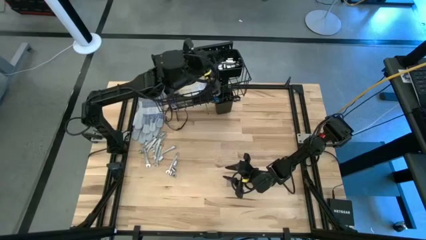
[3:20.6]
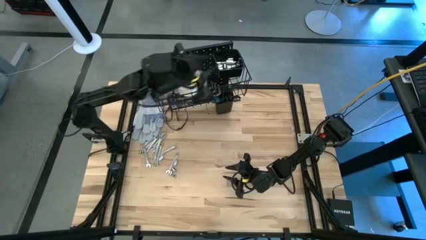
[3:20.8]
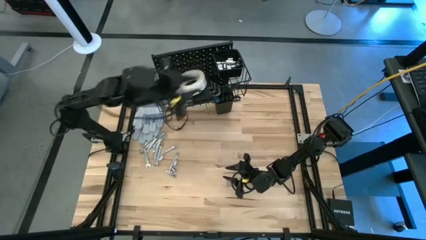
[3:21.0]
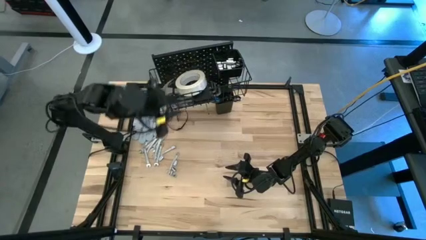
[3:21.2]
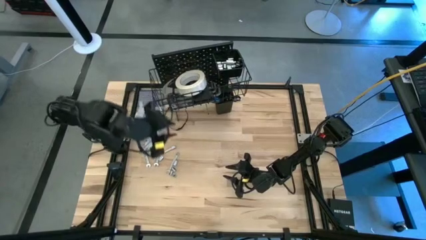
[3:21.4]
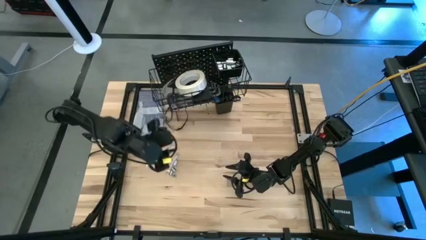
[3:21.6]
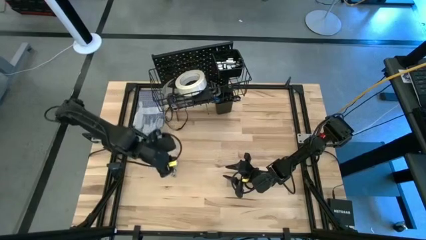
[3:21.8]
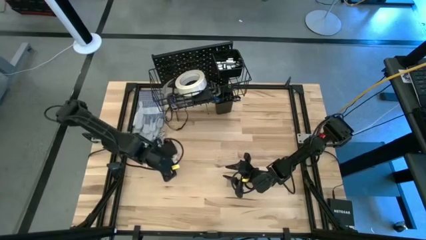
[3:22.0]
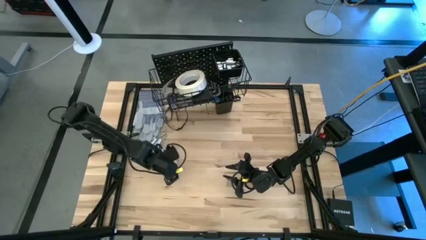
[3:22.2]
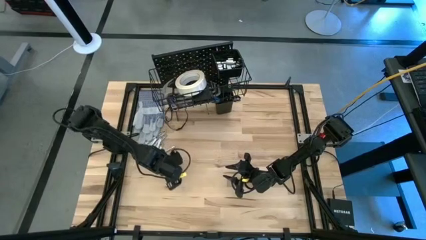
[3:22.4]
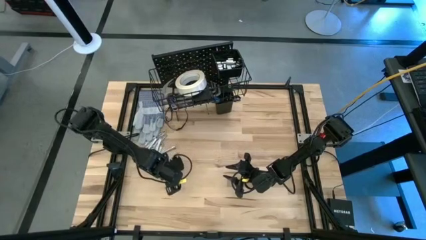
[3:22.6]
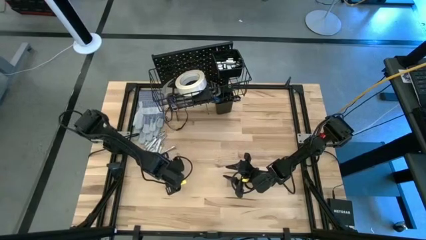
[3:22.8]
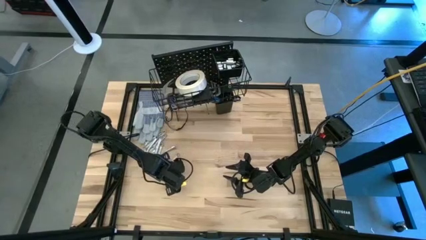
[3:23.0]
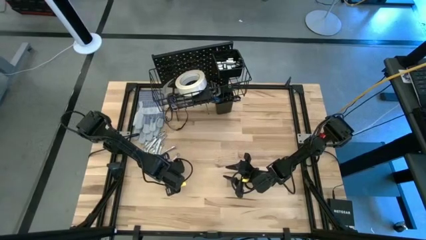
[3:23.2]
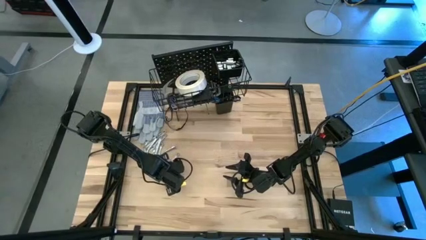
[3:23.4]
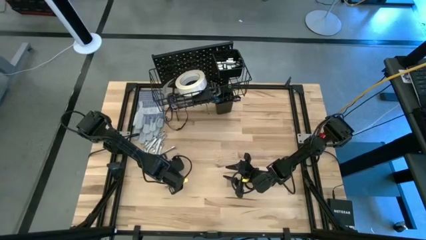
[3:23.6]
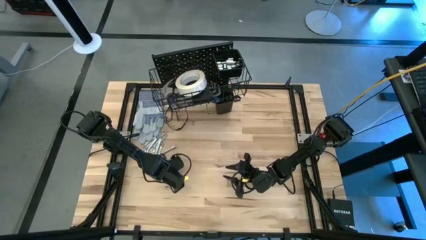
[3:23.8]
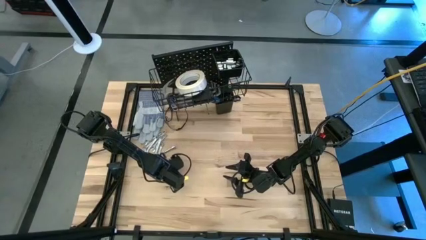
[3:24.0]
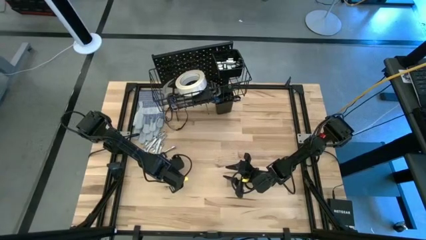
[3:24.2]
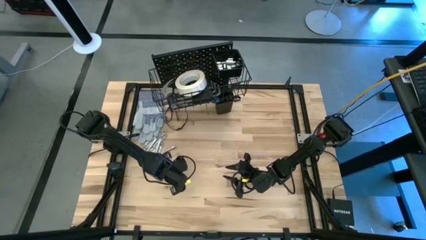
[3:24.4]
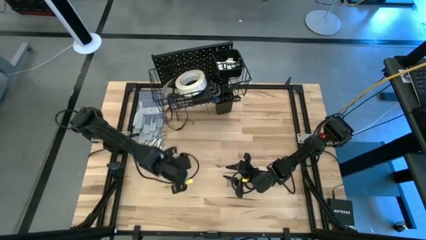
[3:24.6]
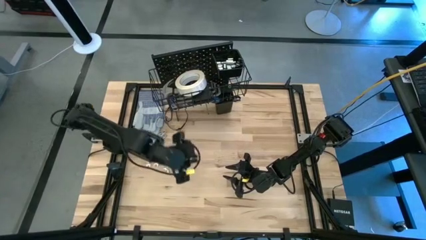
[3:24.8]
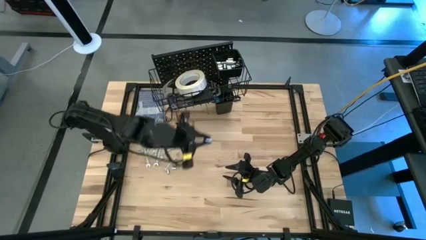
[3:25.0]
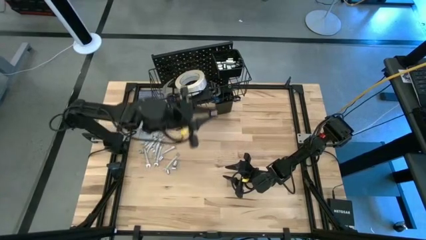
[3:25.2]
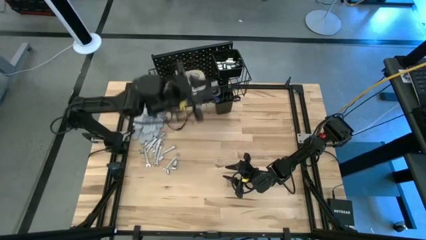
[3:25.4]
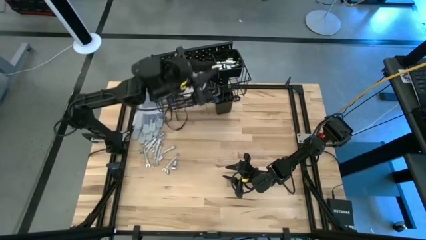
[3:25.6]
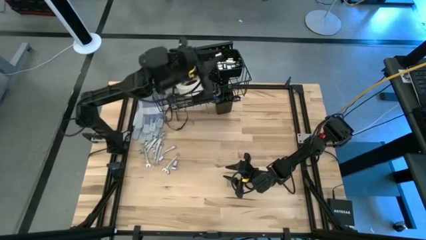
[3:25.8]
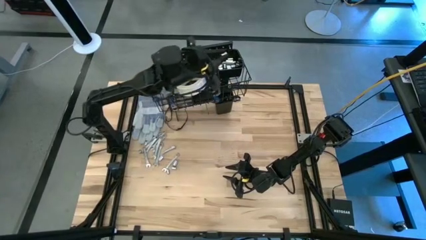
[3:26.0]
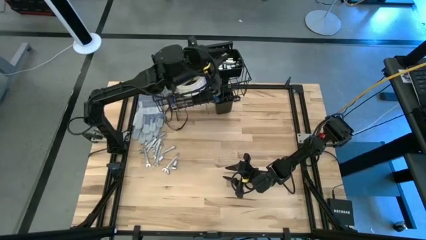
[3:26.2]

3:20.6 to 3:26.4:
Task: Hang tools onto peg board
Put the socket into the top black bin on the pegboard

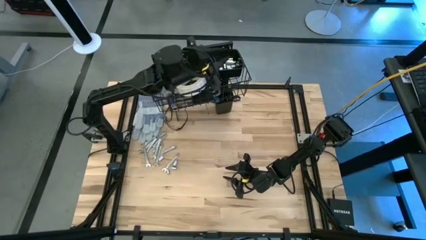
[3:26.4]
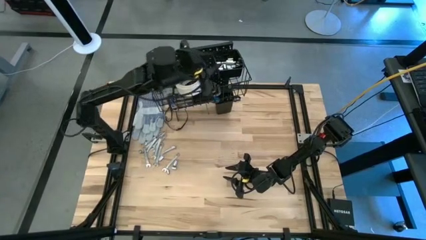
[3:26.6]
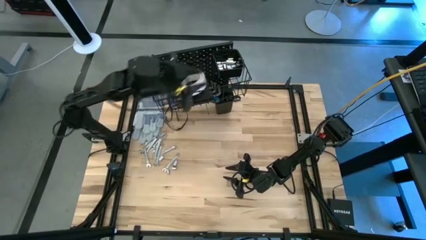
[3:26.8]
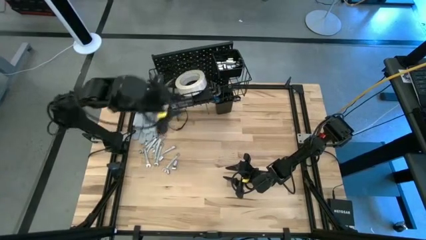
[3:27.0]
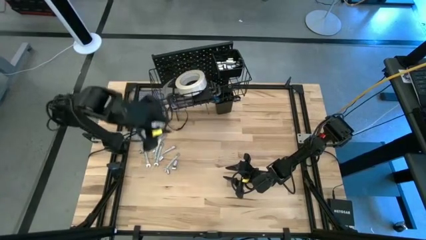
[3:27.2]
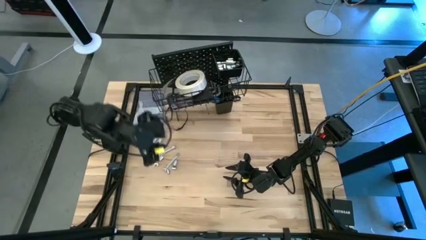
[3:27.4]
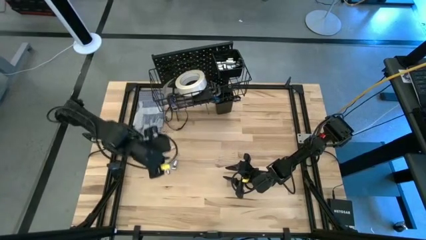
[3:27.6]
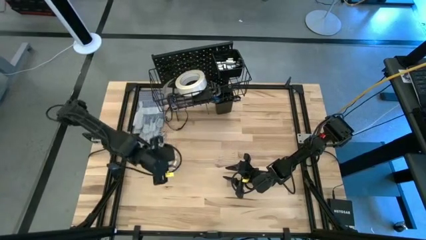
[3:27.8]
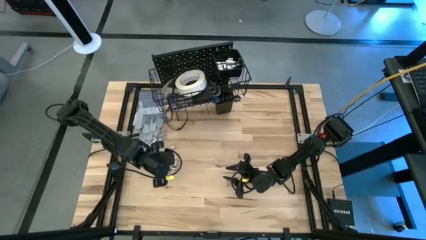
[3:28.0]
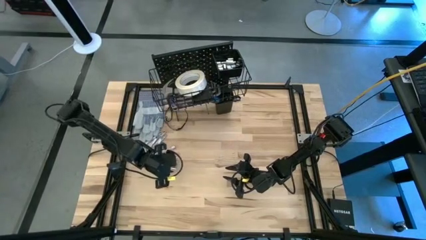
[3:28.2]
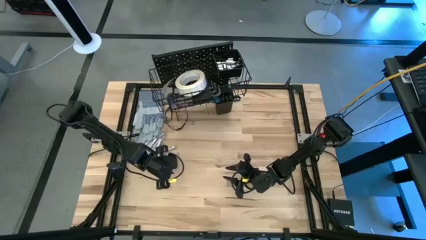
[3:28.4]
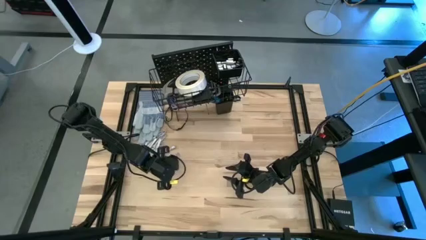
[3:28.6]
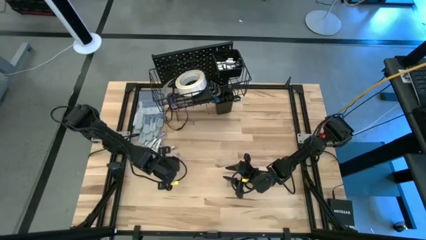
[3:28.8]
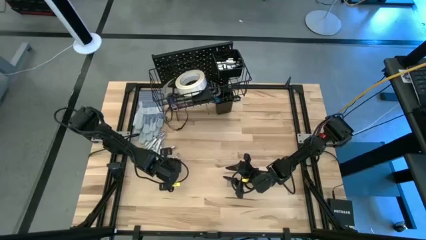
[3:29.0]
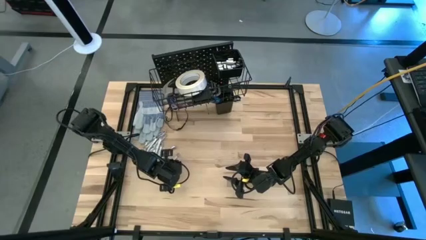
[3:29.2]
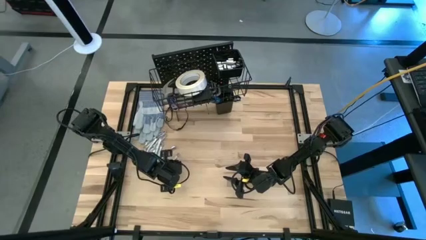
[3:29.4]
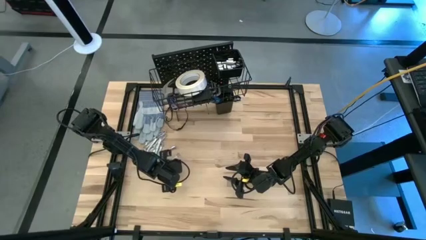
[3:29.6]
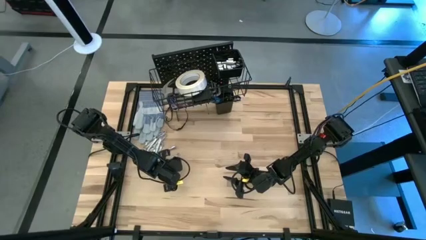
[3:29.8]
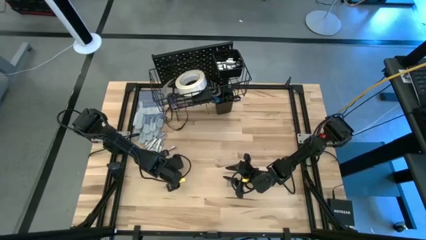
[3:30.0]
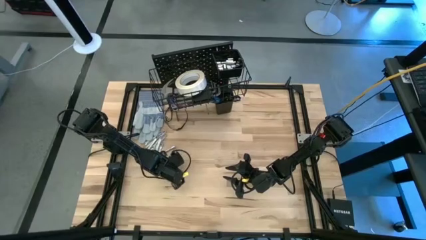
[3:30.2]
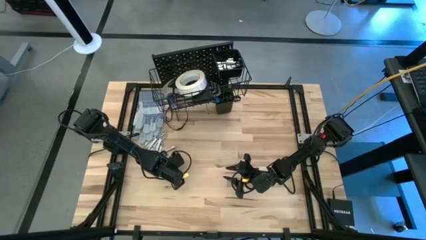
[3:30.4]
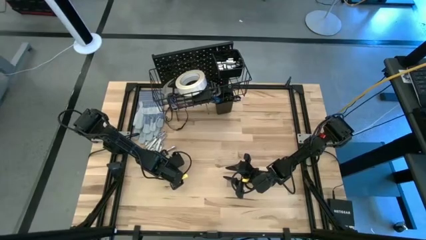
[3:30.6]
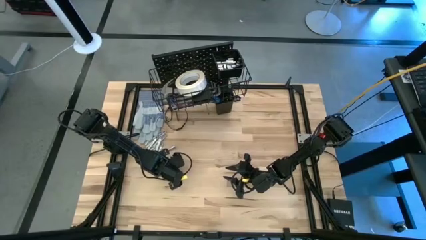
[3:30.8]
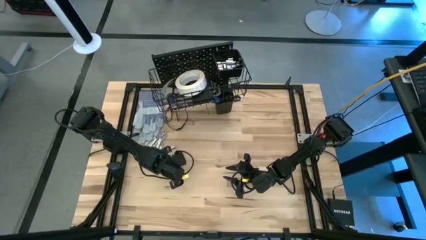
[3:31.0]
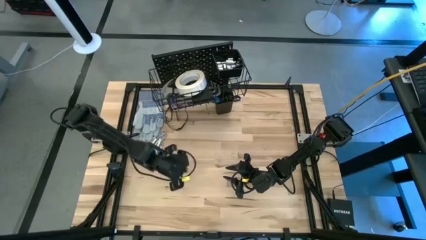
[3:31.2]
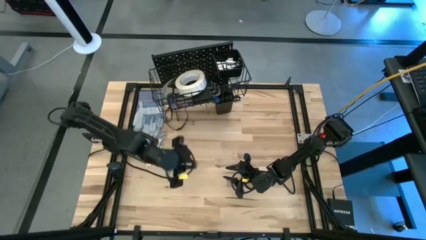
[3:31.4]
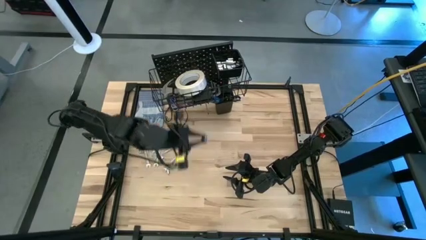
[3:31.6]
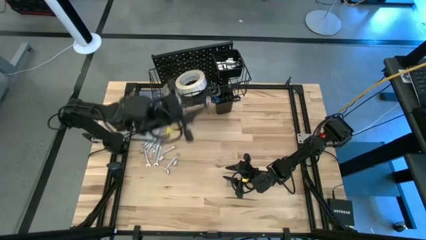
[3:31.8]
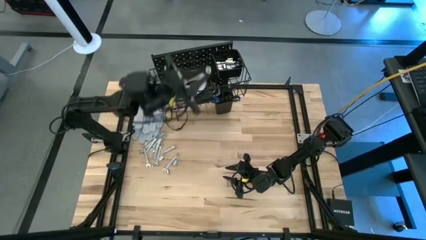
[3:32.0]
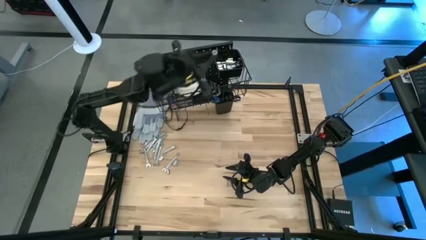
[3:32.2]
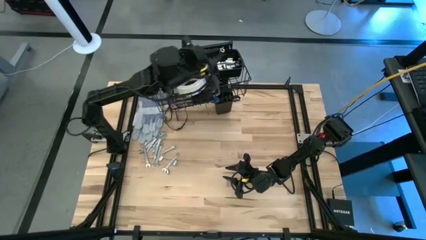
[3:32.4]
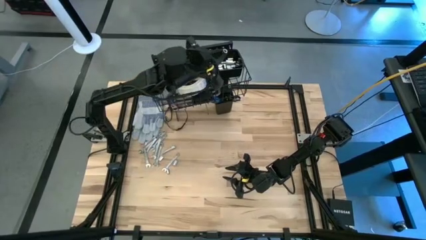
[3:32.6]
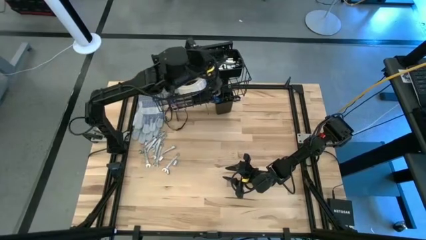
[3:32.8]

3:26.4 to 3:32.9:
Put the socket into the top black bin on the pegboard

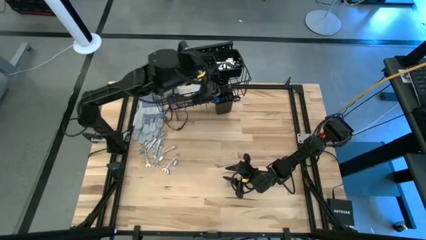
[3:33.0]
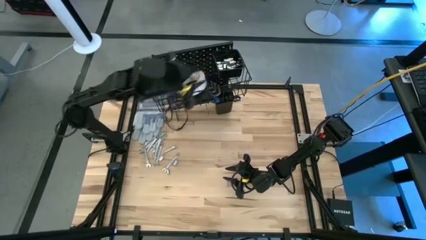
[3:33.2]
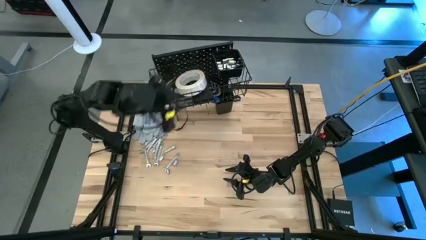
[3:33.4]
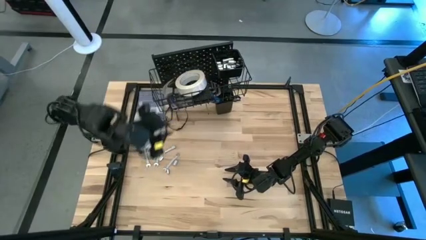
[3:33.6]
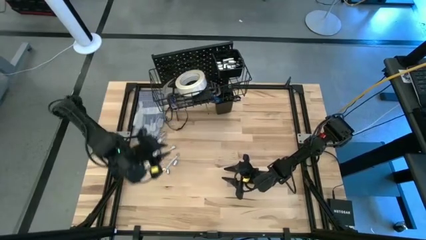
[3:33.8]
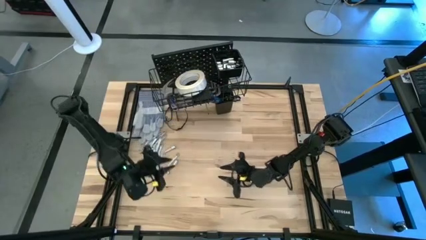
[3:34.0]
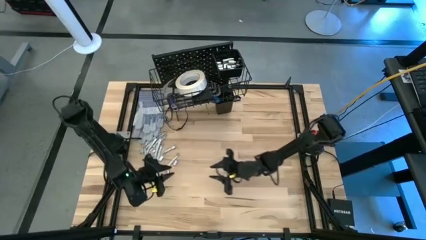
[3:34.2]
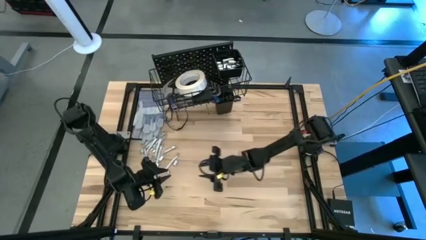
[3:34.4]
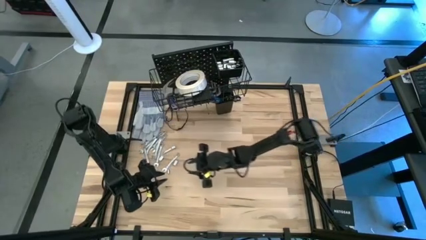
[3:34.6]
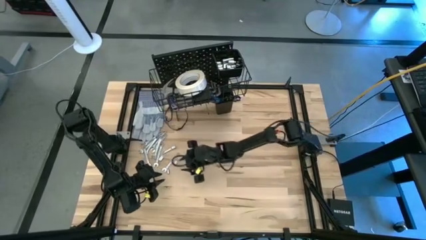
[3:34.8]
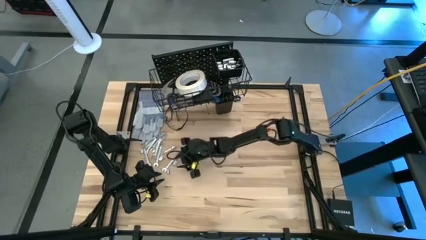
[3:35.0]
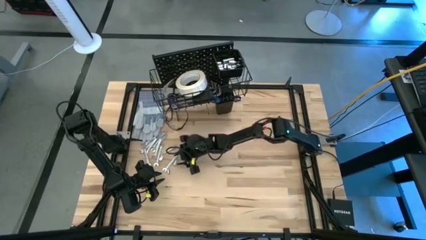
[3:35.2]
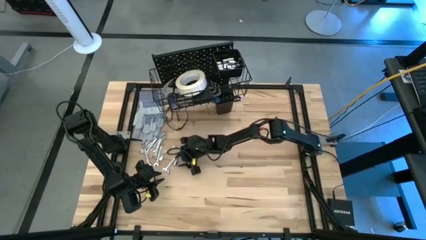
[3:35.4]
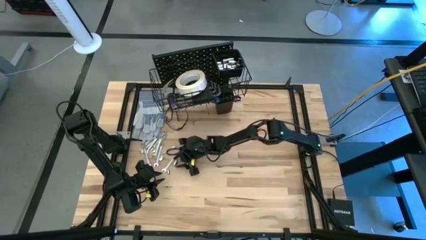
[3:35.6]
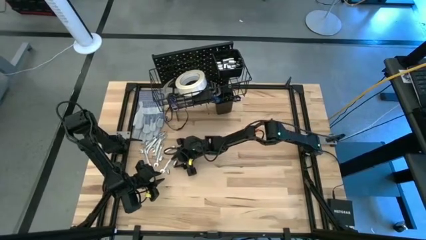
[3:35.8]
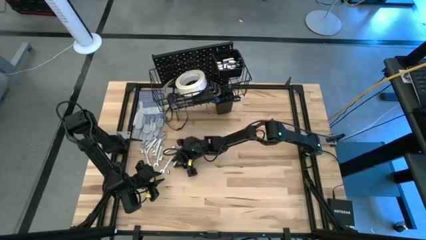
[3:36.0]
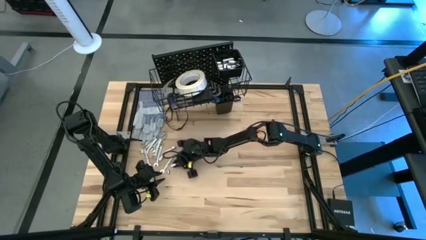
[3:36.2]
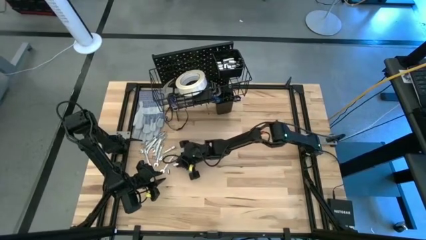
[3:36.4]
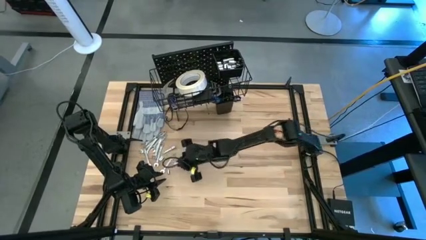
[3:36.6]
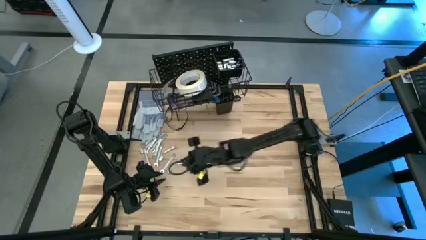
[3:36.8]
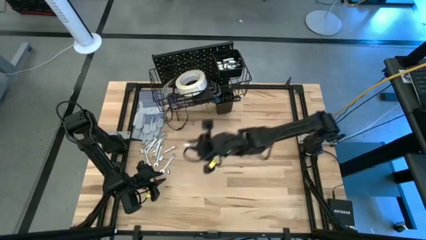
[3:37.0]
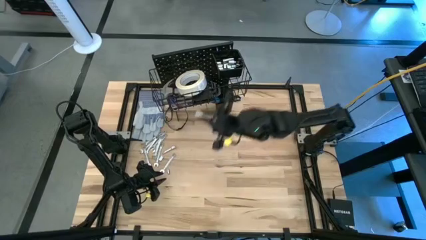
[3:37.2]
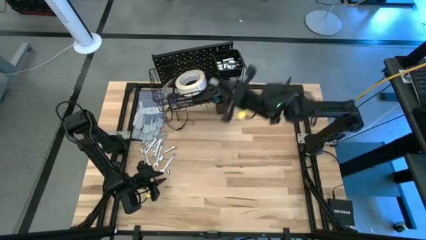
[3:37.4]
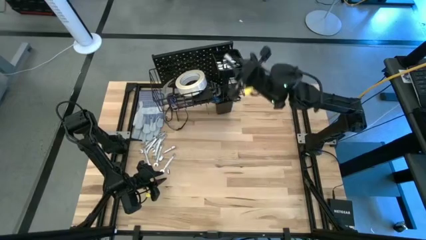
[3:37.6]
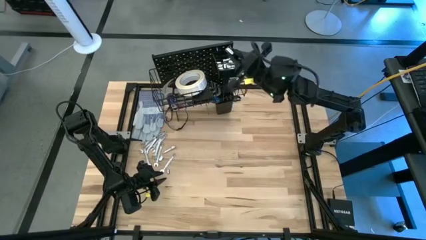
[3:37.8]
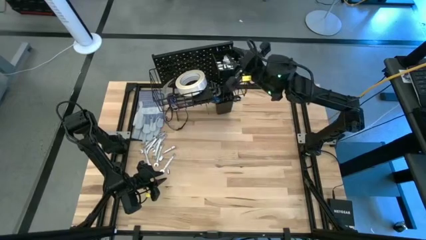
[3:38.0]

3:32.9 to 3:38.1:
Put the socket into the top black bin on the pegboard
